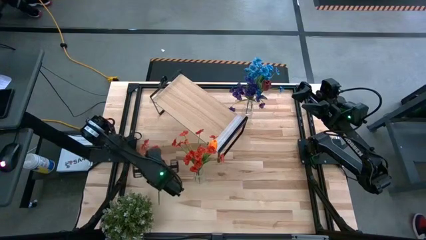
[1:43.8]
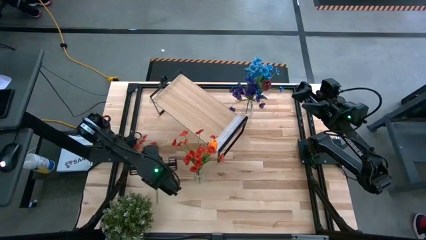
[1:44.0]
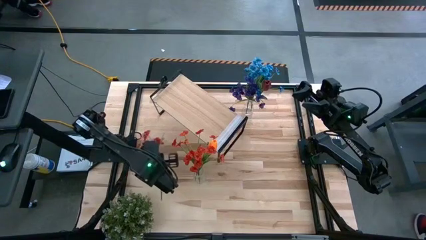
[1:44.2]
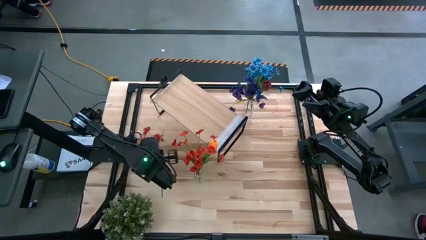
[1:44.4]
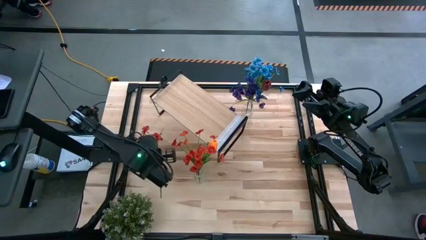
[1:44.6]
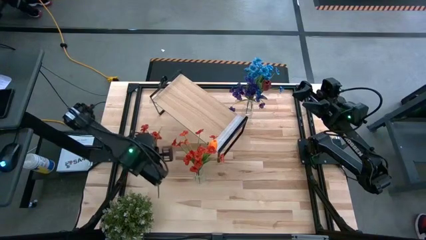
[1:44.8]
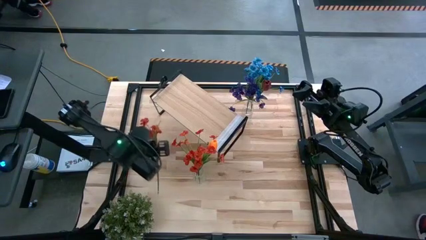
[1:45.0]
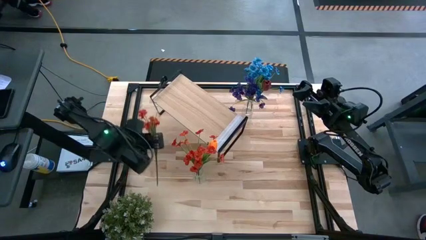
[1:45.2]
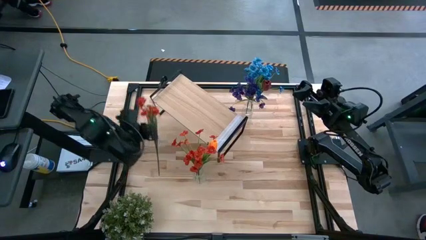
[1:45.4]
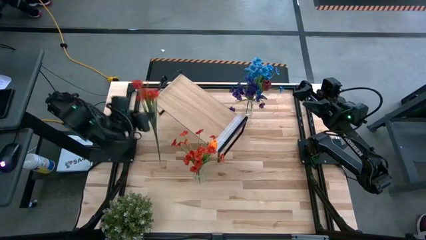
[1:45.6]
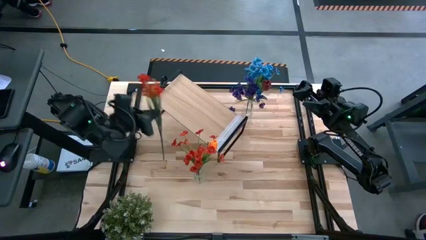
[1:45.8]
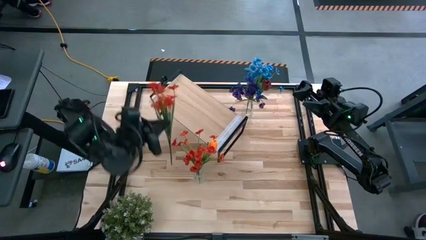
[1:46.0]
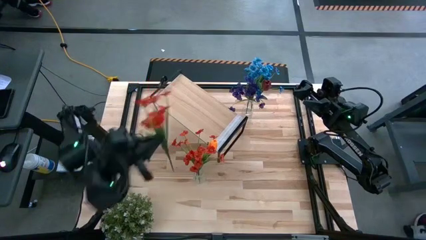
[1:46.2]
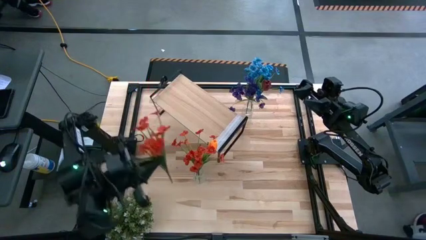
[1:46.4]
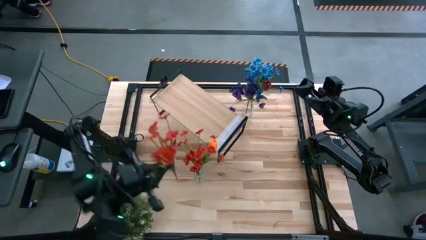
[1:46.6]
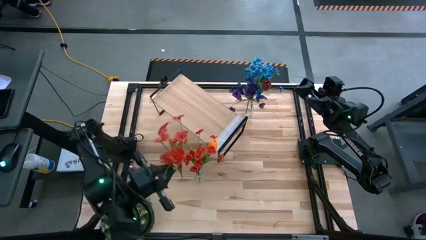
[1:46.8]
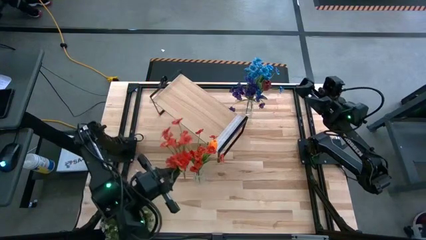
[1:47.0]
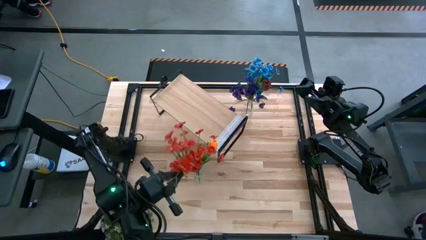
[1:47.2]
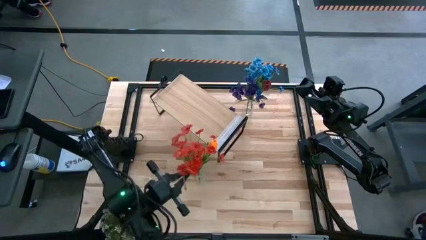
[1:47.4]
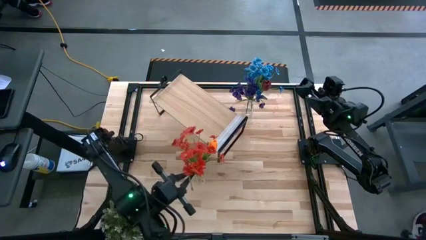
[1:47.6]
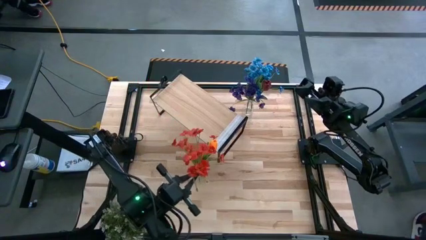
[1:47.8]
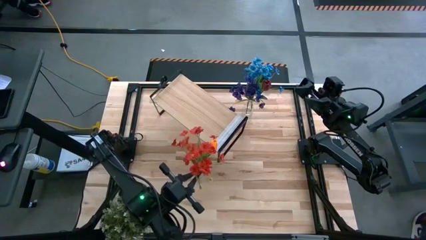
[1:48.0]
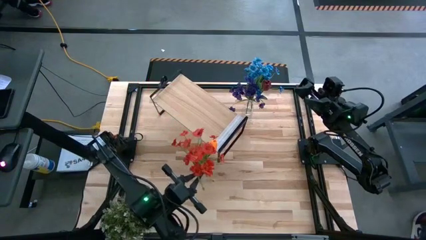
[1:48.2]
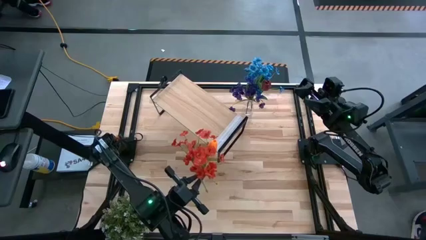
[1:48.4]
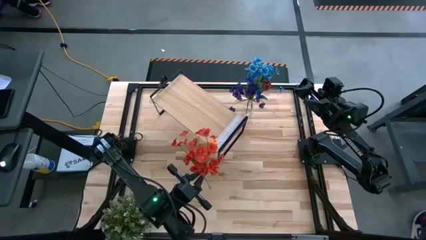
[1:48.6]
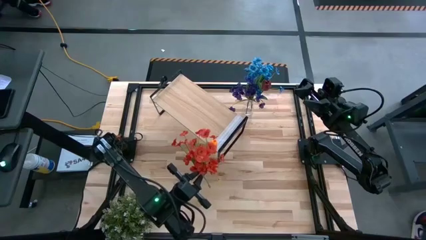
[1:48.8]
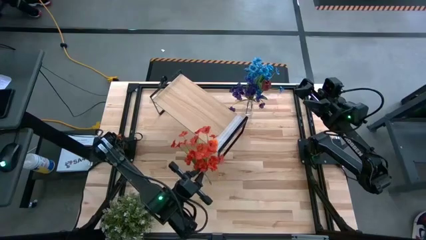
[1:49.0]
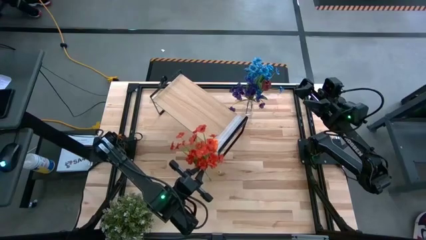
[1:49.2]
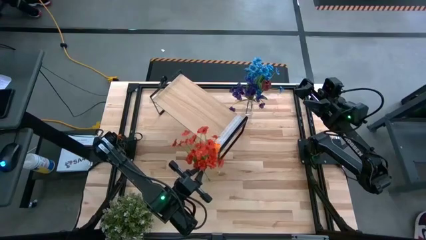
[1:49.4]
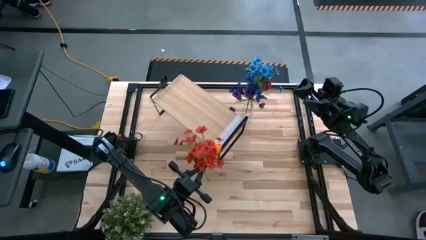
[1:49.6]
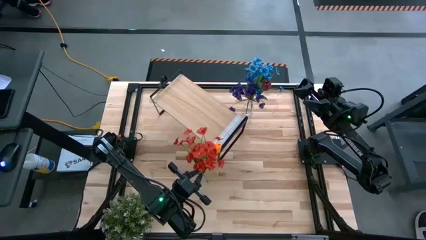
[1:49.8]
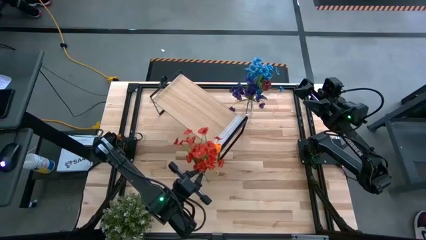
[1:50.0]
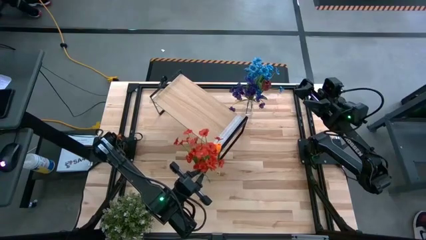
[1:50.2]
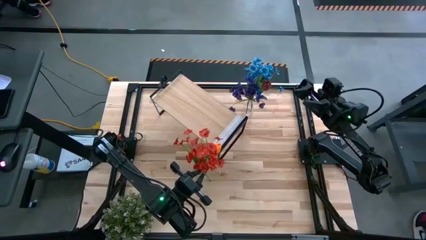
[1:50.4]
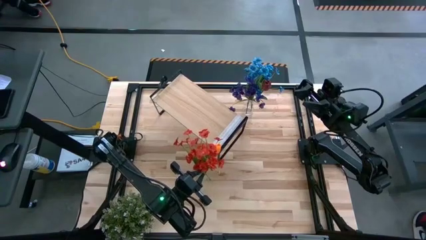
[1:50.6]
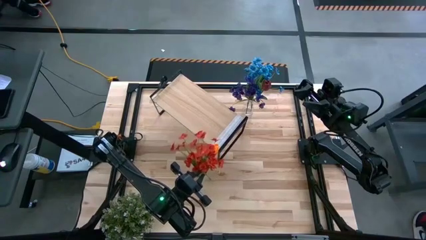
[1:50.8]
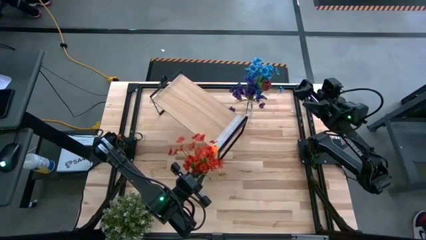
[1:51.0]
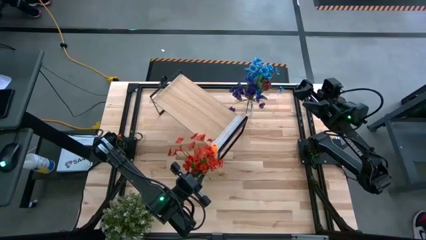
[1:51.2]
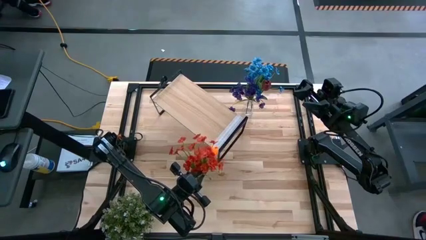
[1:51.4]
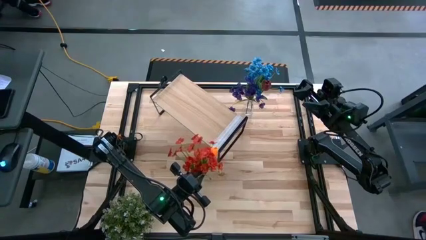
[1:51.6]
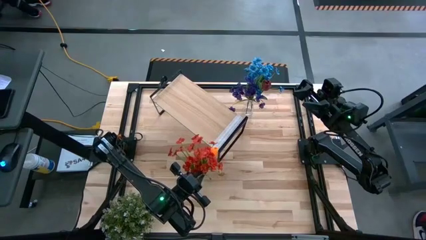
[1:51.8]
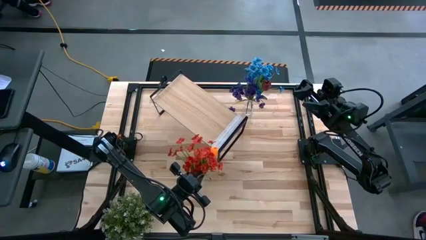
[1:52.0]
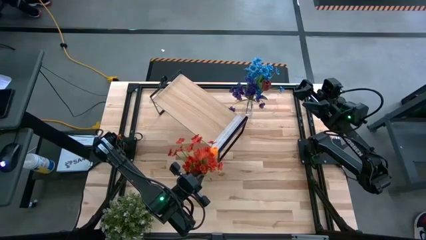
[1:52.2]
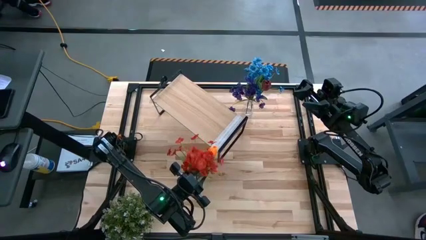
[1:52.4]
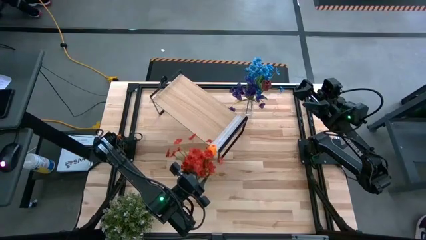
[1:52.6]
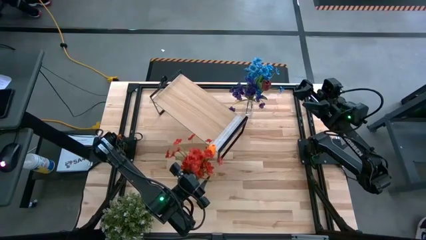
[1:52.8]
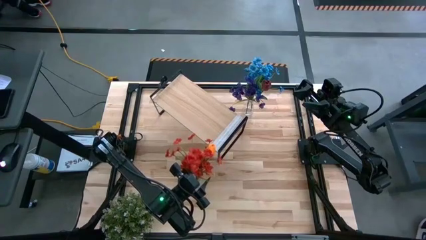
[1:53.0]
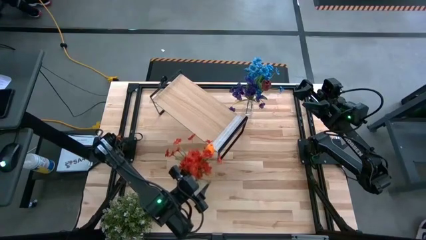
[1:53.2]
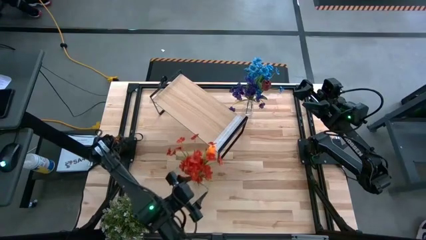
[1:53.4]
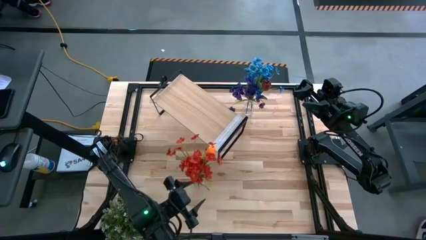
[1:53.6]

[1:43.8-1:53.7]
Task: Pick and place flowers into a vace then onto a shelf
Put the orange flowers into the bottom transparent flower vase
